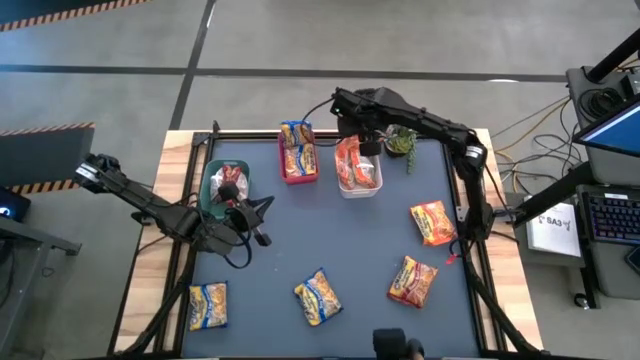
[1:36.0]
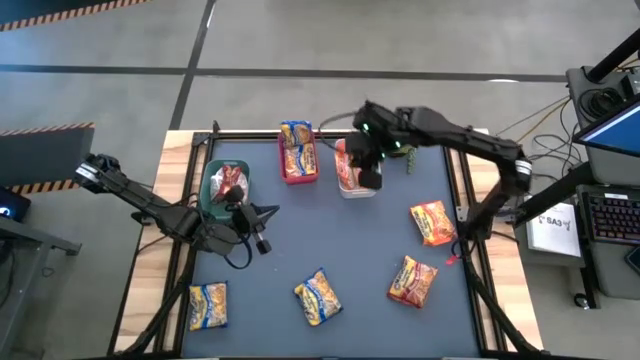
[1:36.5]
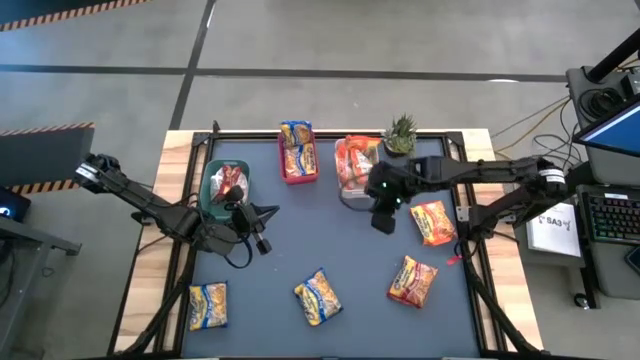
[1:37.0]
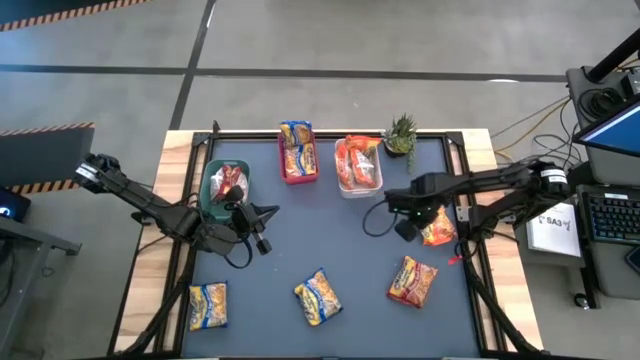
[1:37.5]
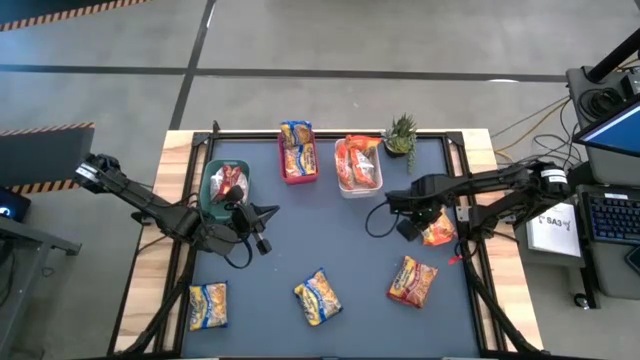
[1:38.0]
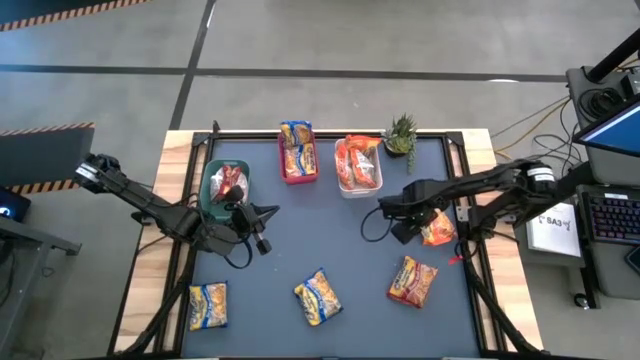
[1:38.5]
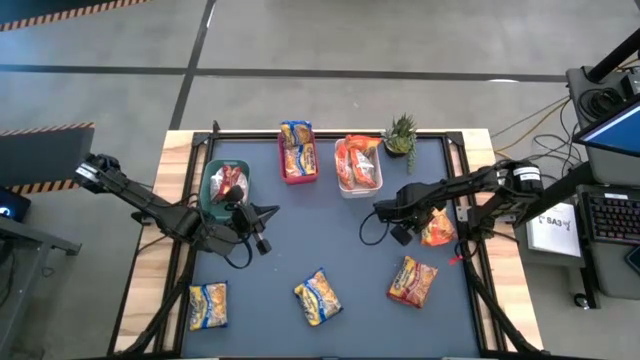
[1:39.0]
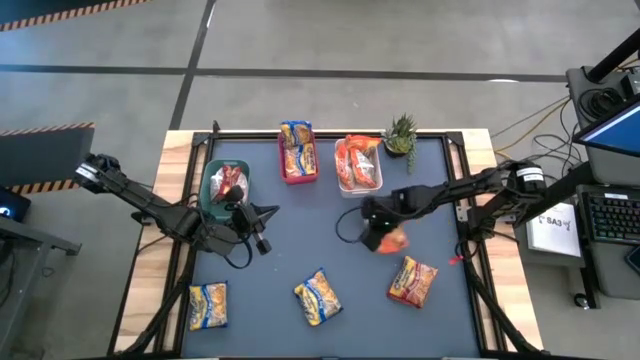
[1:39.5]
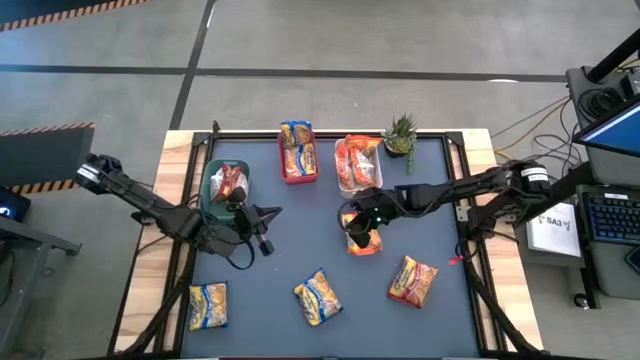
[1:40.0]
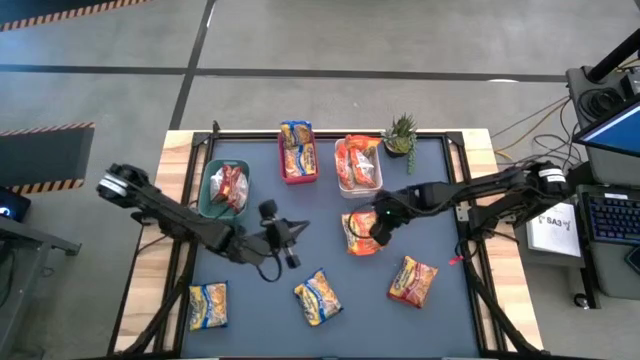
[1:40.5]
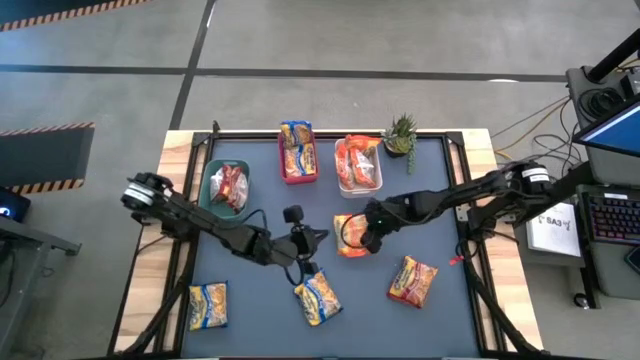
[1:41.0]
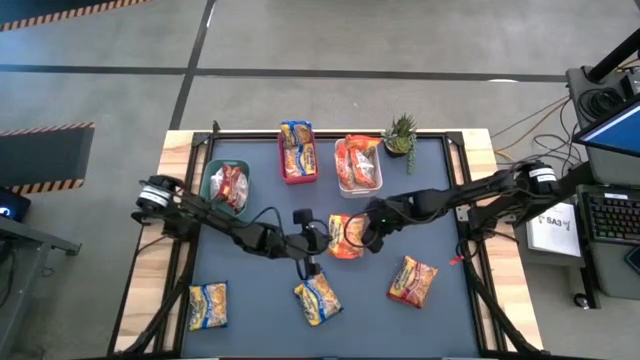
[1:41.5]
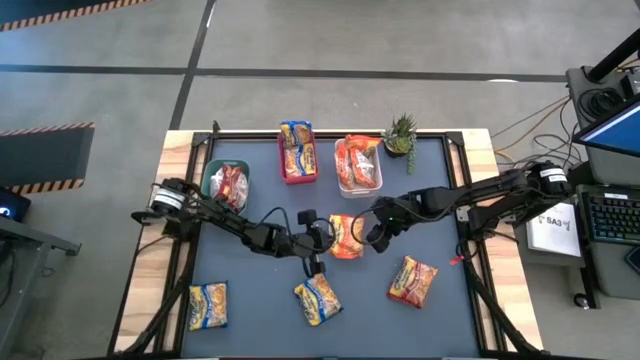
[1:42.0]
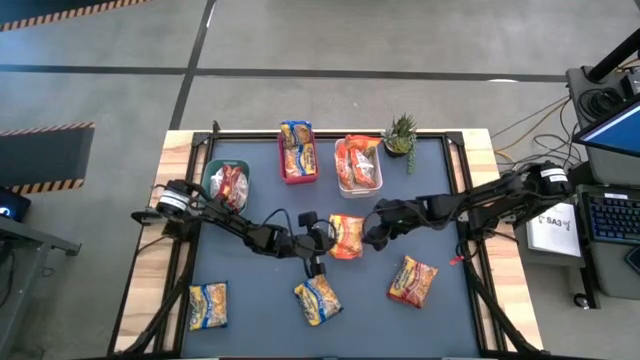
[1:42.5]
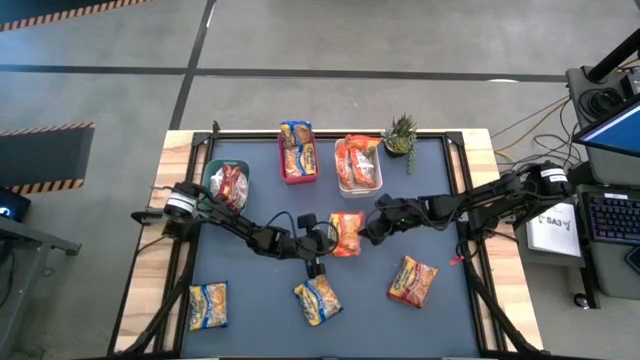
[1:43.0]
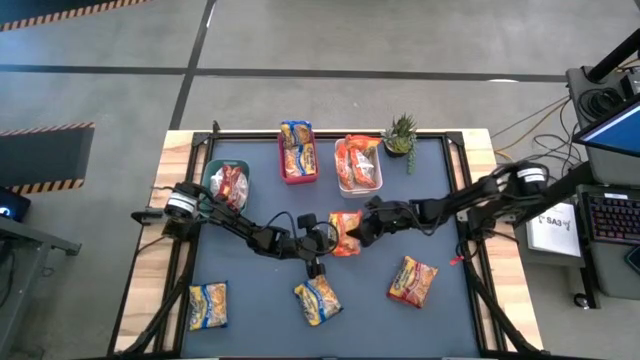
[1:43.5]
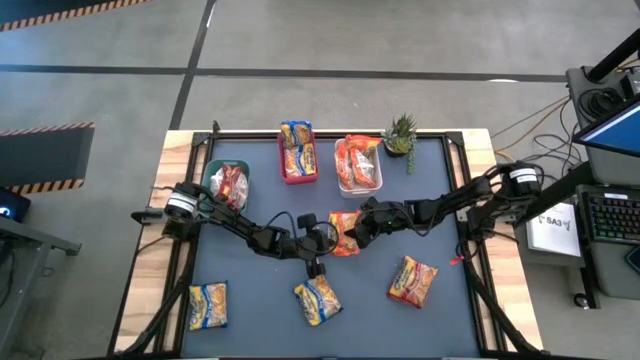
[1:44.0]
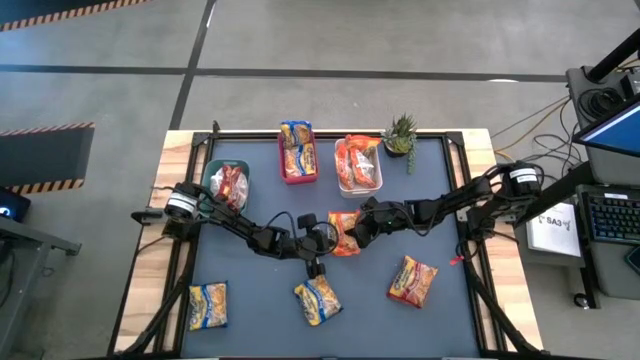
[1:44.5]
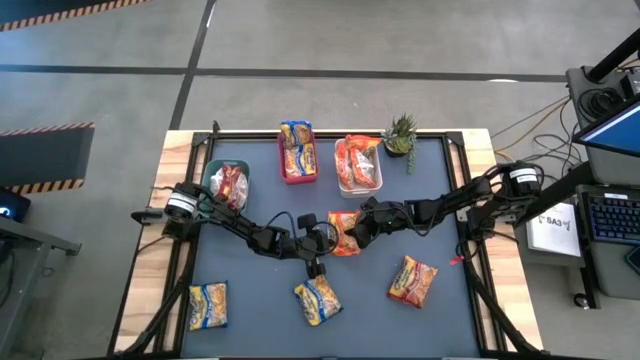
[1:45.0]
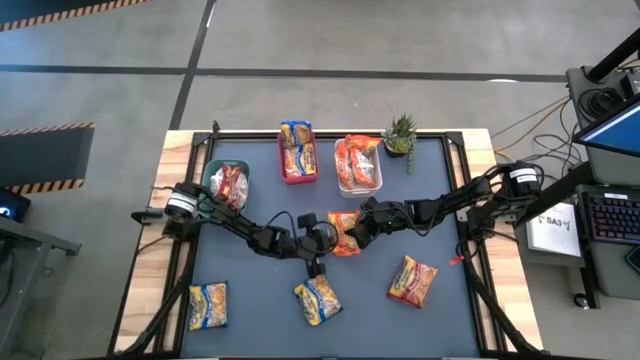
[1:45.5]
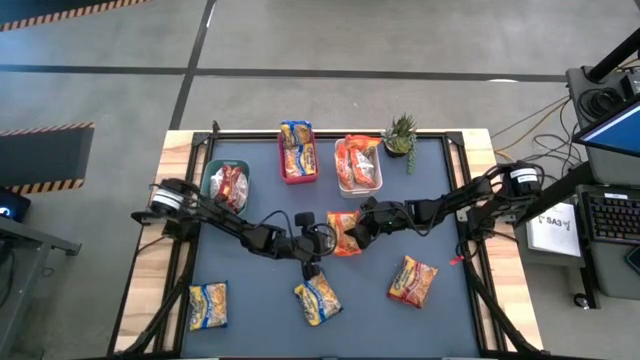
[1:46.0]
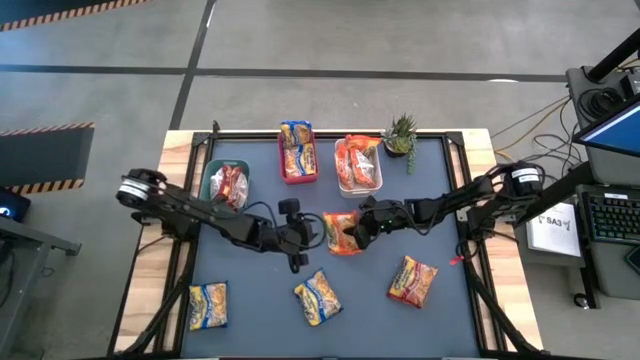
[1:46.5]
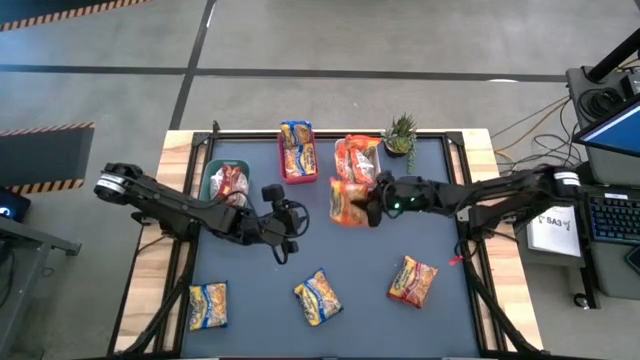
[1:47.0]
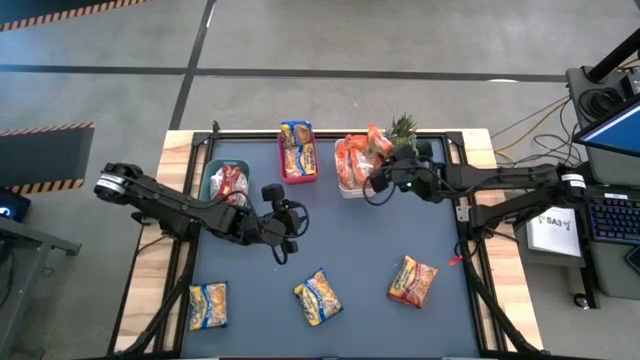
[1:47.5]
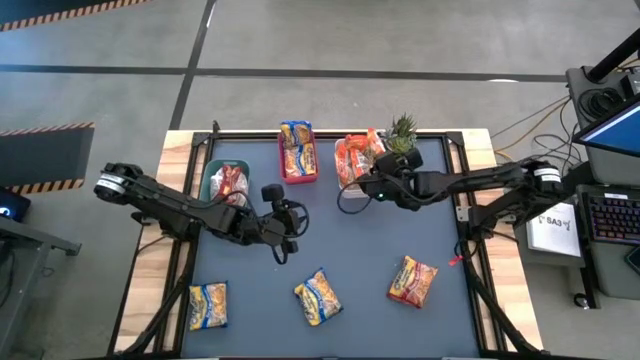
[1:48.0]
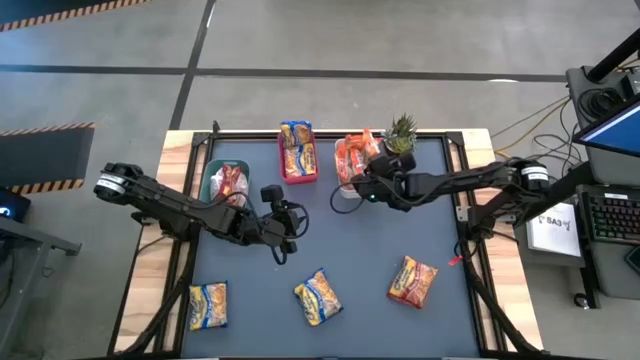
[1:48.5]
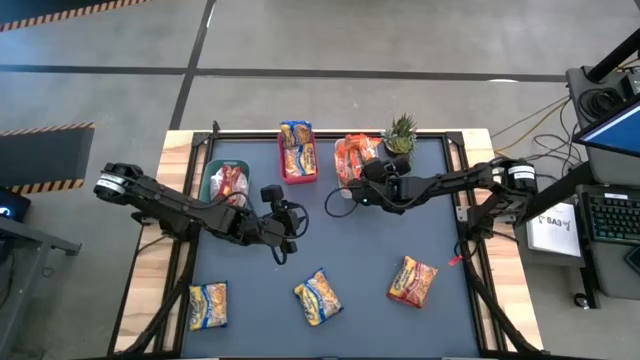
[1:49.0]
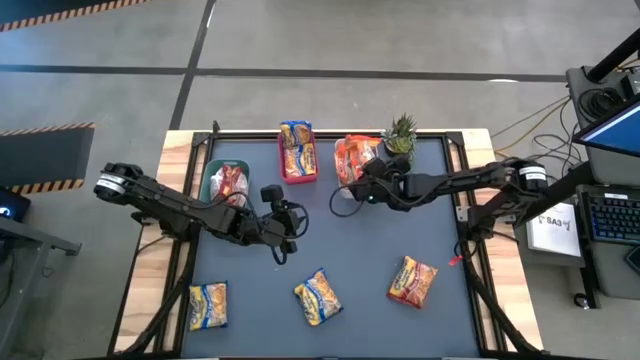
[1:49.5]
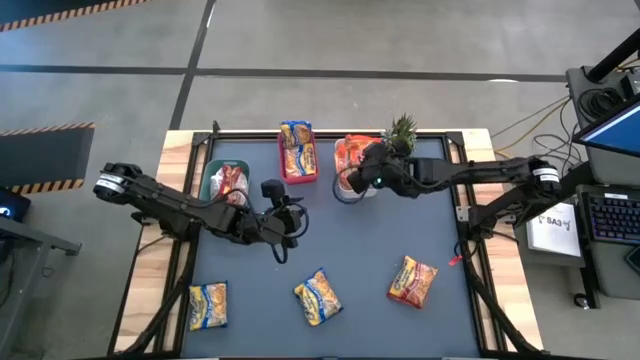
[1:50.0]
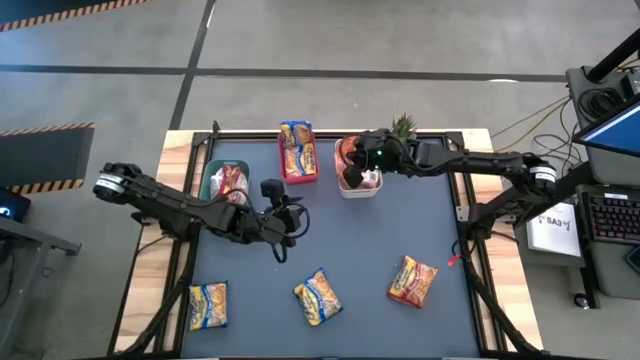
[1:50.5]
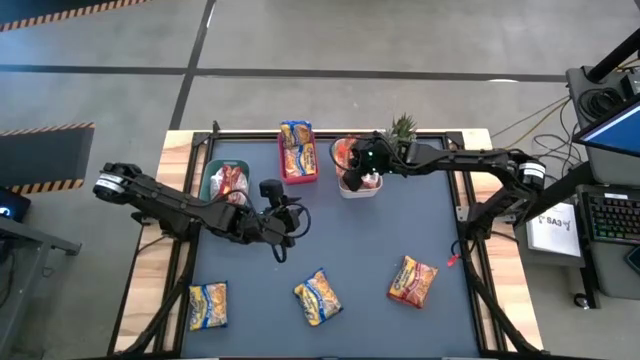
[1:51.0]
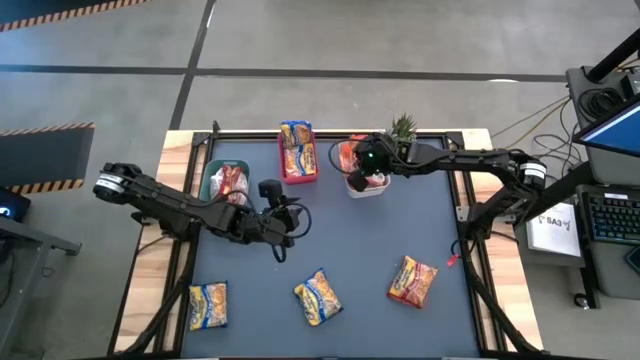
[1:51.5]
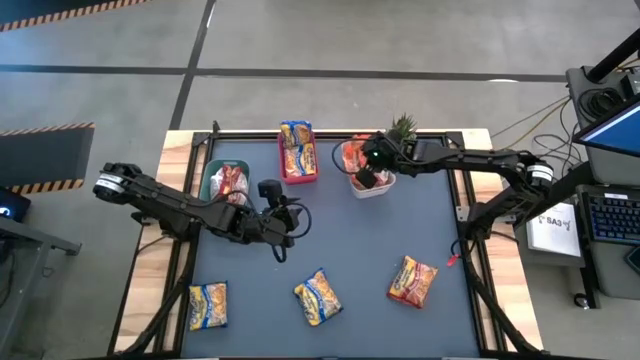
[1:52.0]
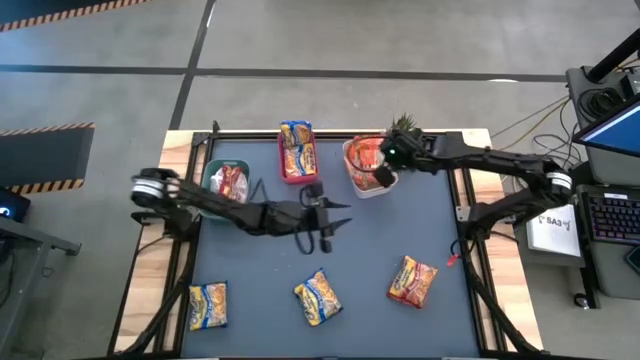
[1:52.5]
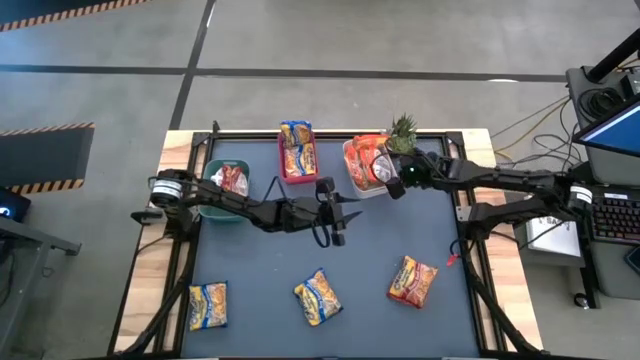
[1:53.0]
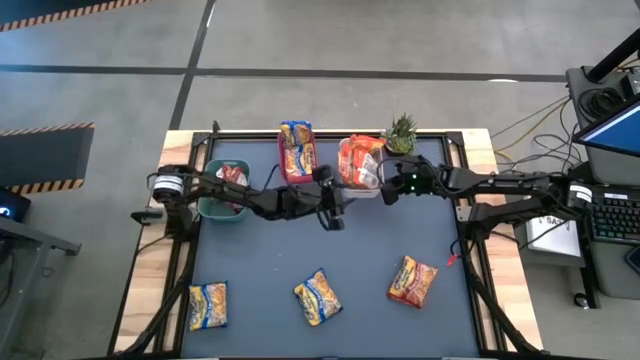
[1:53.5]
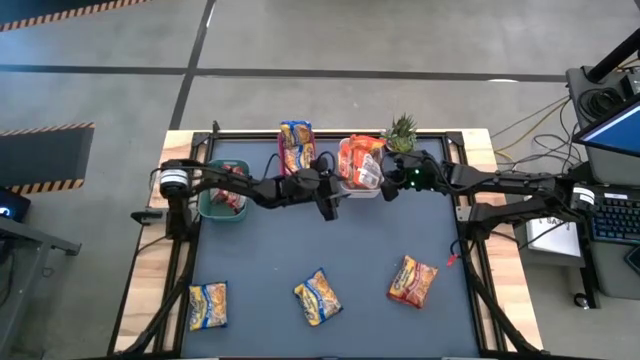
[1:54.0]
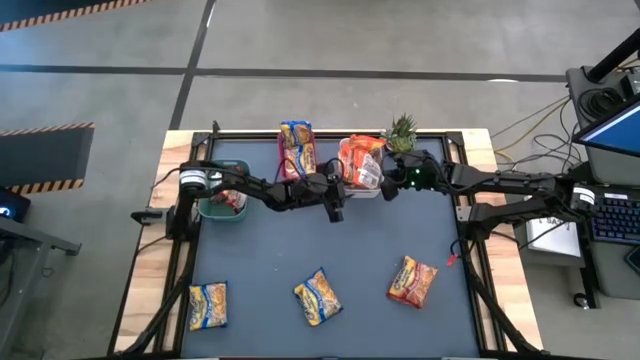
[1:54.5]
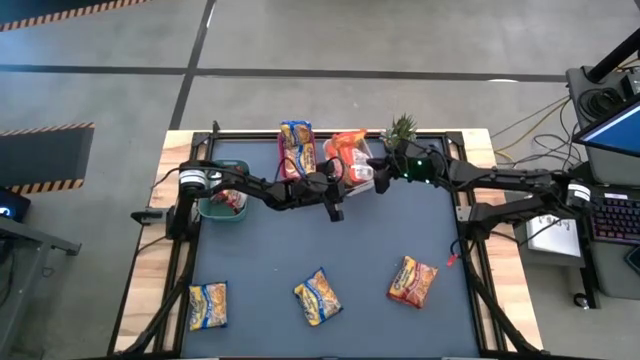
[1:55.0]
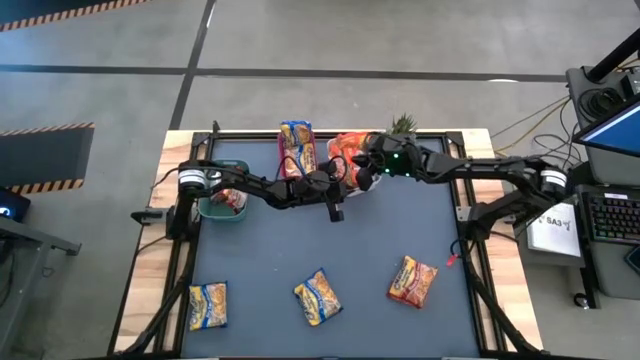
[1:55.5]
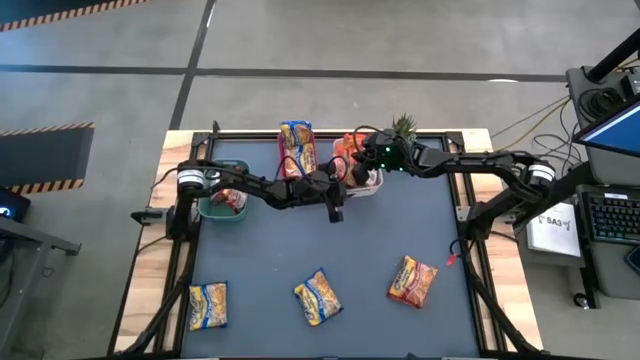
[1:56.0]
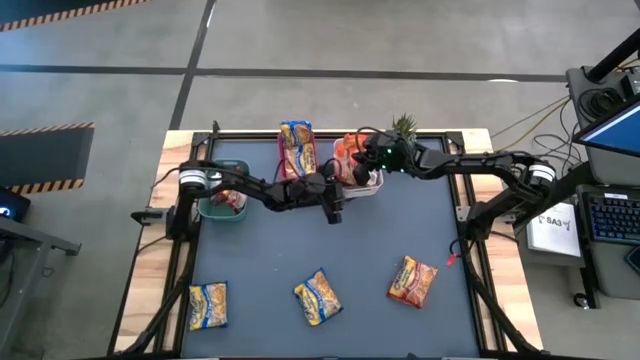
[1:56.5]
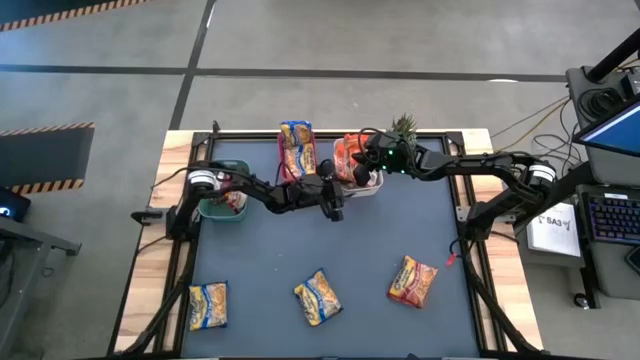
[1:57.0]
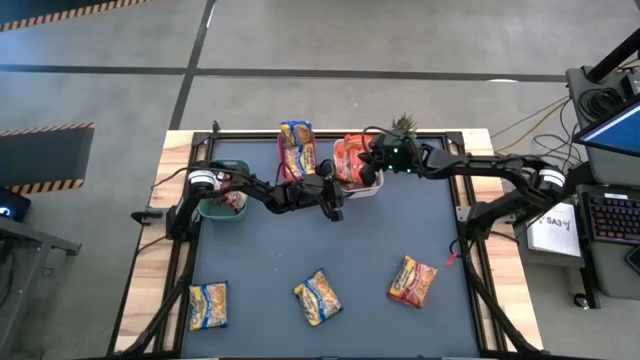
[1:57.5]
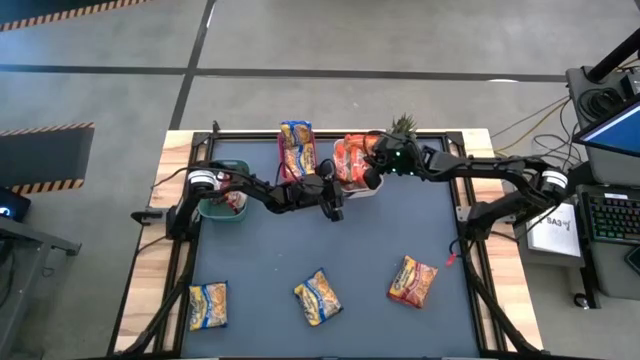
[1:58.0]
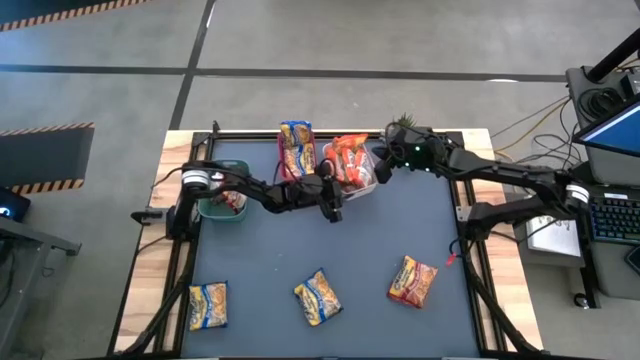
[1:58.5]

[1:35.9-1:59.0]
Task: Sort Maruchan noodles
Put the orange noodle pack into the white bin
